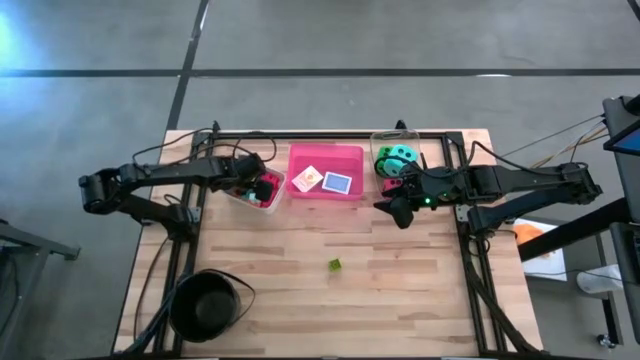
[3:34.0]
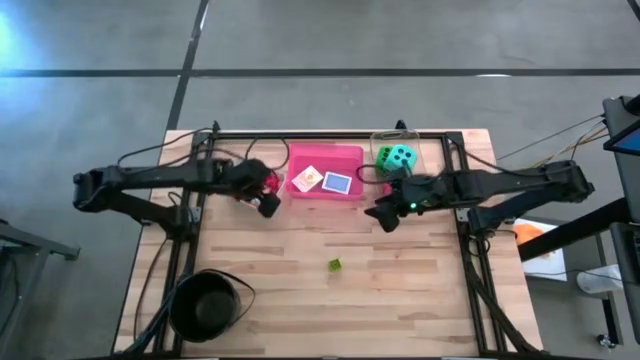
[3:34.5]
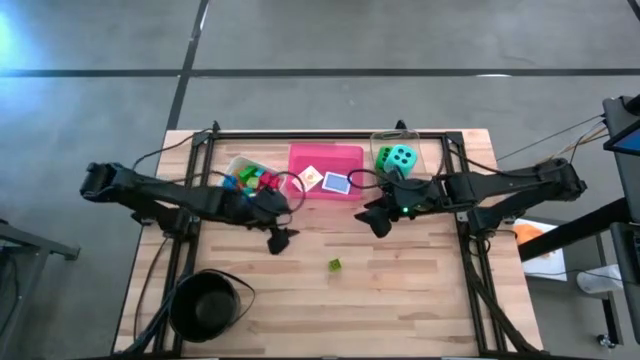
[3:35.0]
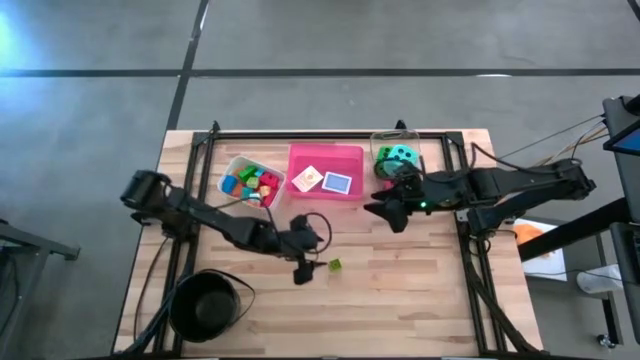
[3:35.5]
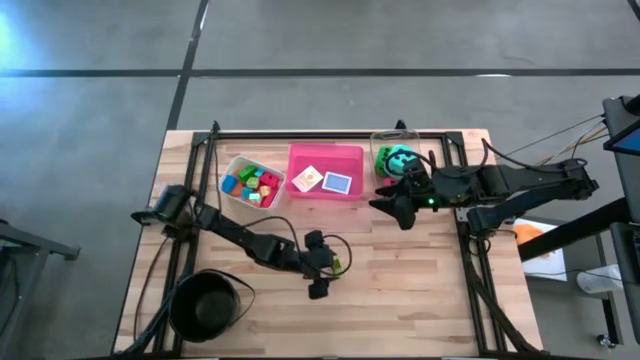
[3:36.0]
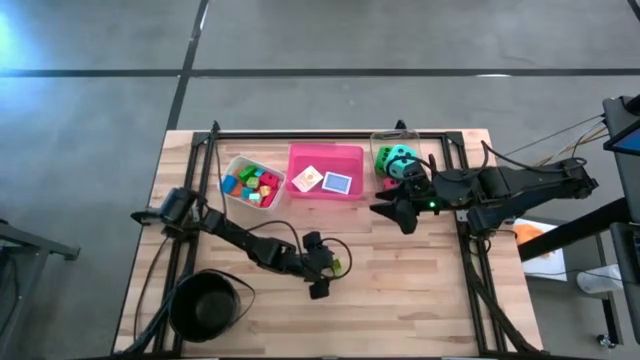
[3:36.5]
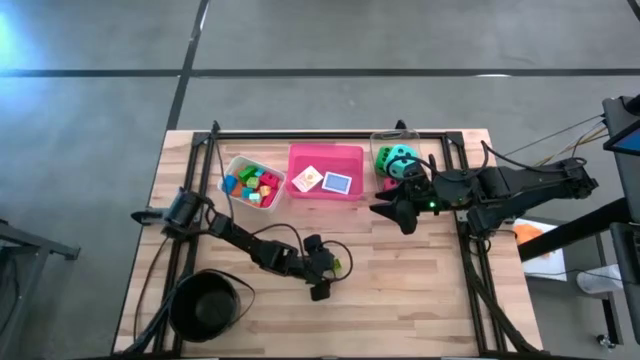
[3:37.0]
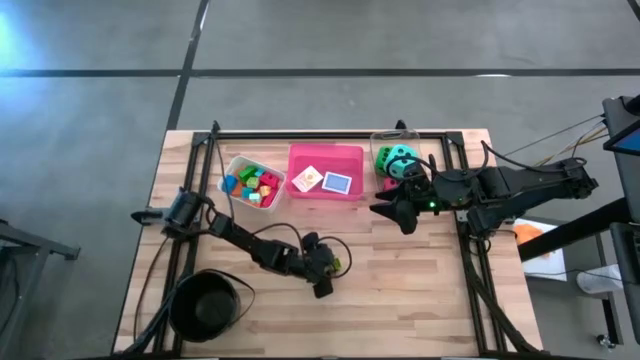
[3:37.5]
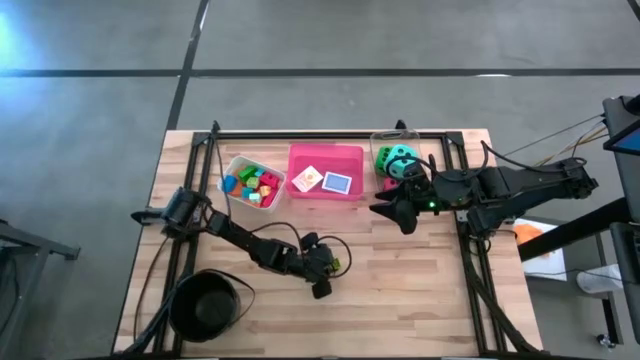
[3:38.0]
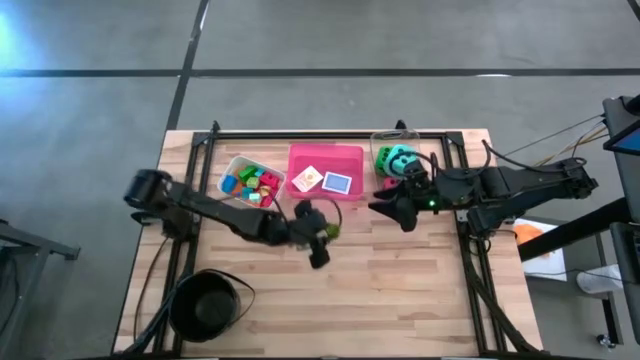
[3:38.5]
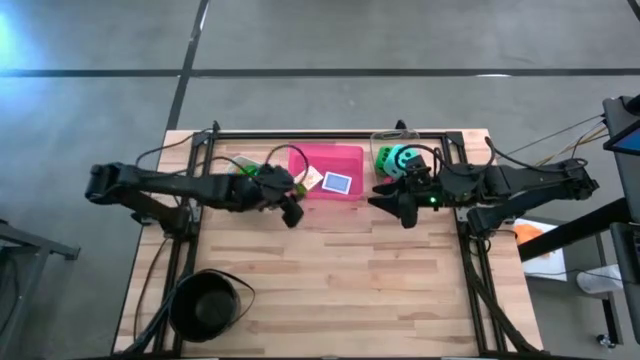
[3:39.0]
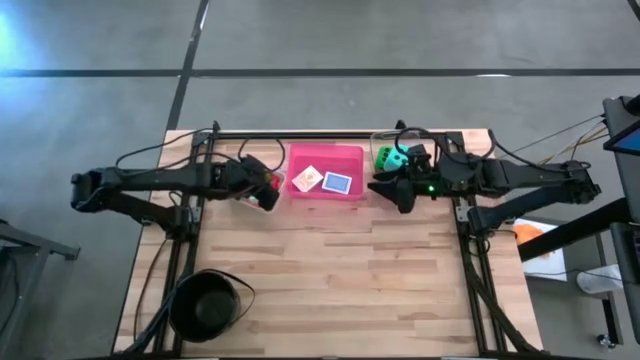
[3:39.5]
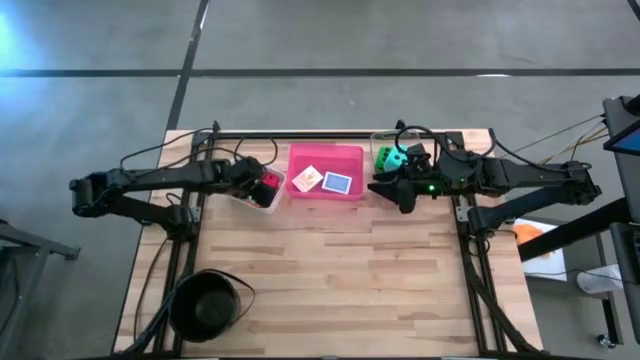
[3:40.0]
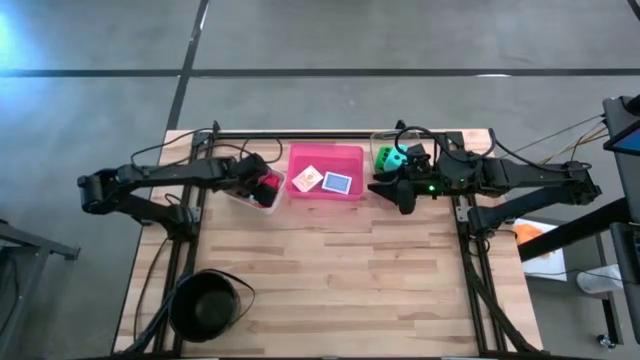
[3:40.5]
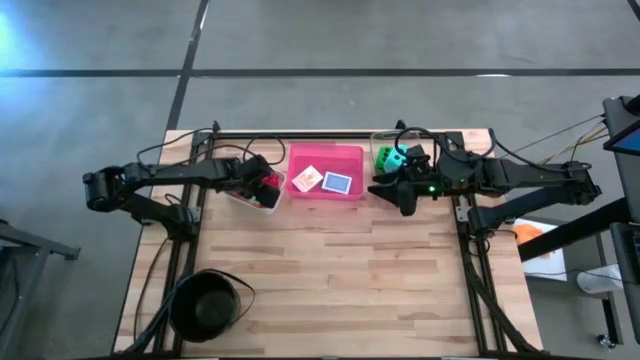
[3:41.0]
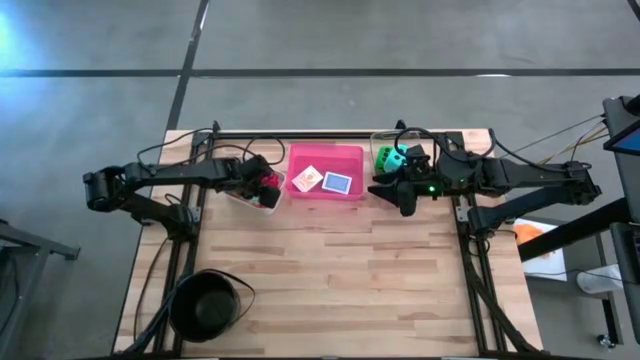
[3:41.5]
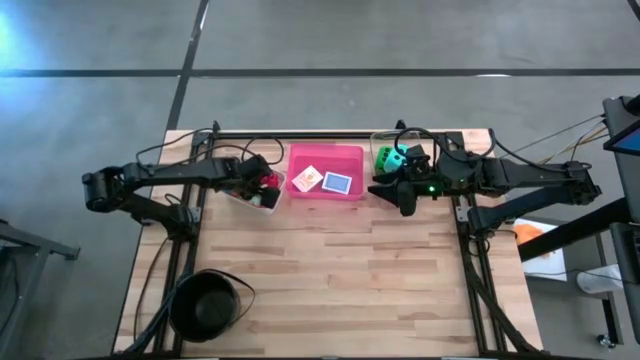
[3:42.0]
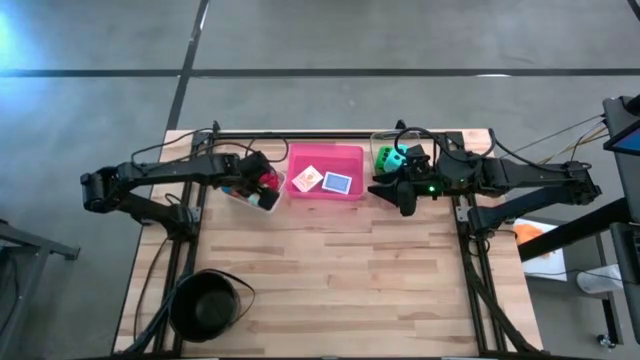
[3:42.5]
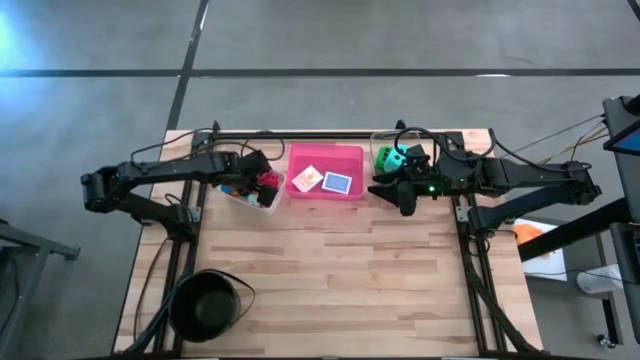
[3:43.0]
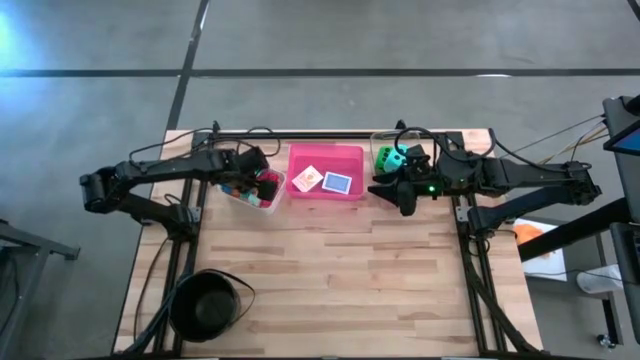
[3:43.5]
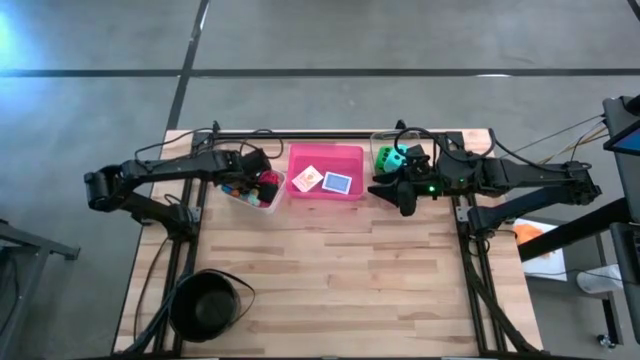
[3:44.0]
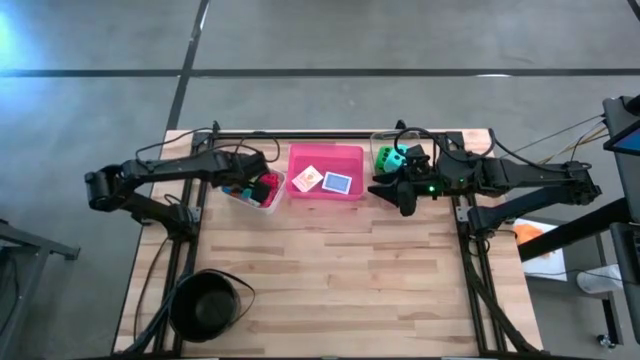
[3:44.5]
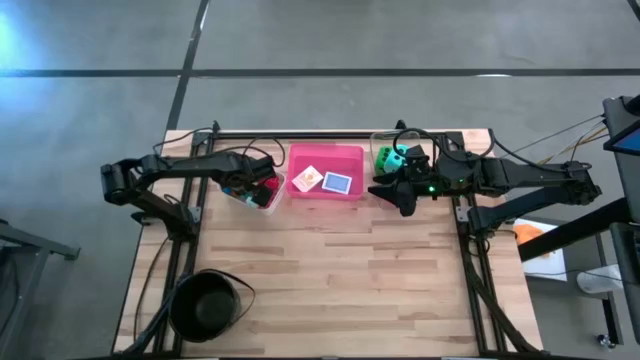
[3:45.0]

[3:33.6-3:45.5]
Task: Pick & Place Toys
Put the green game piece into the white bin

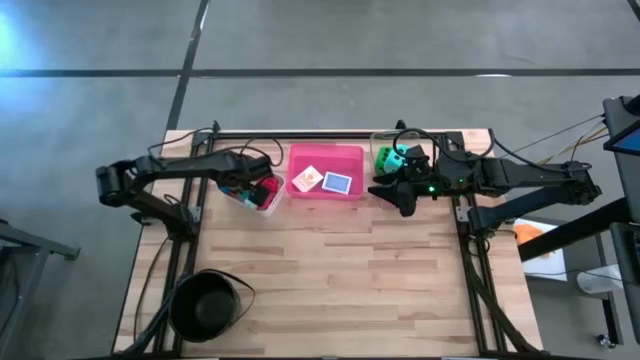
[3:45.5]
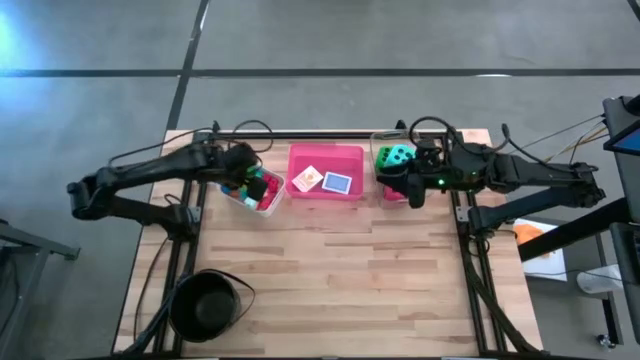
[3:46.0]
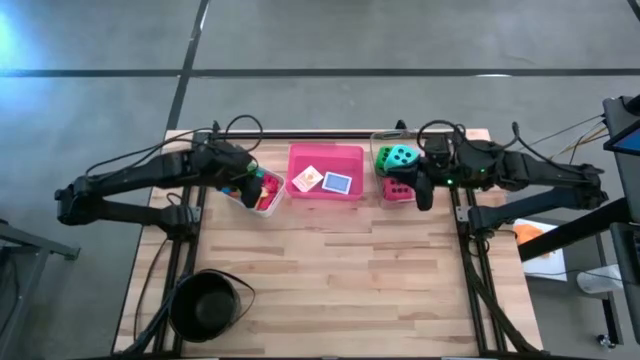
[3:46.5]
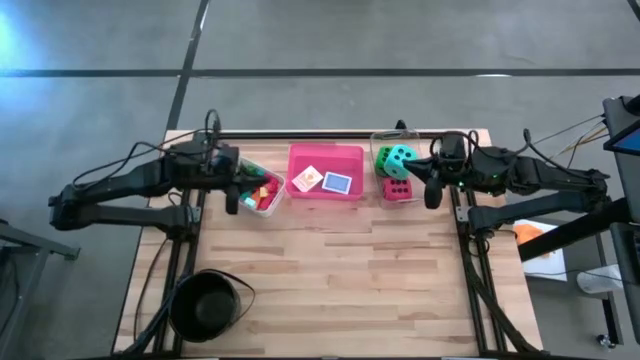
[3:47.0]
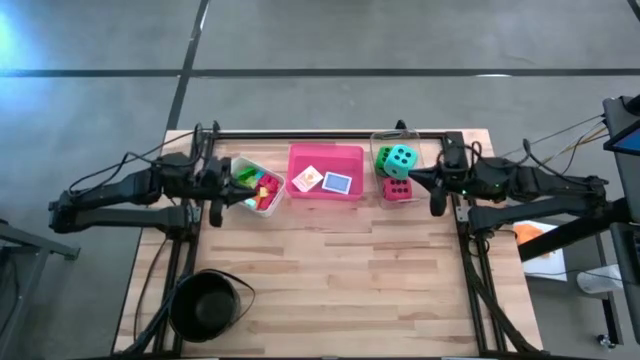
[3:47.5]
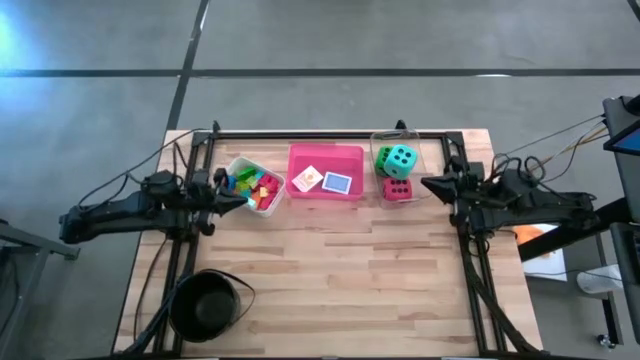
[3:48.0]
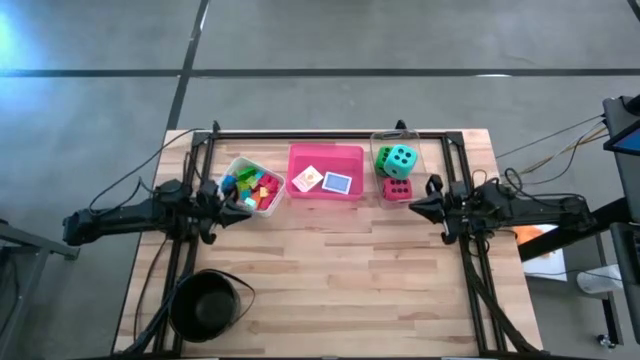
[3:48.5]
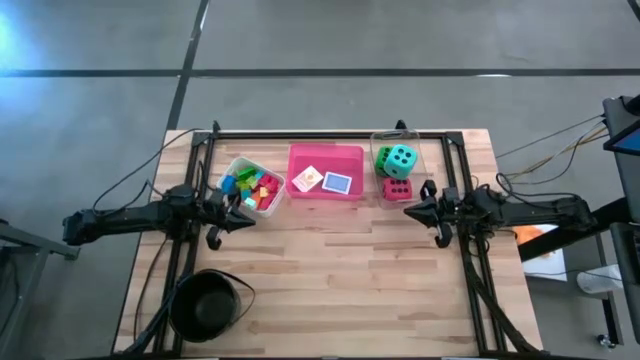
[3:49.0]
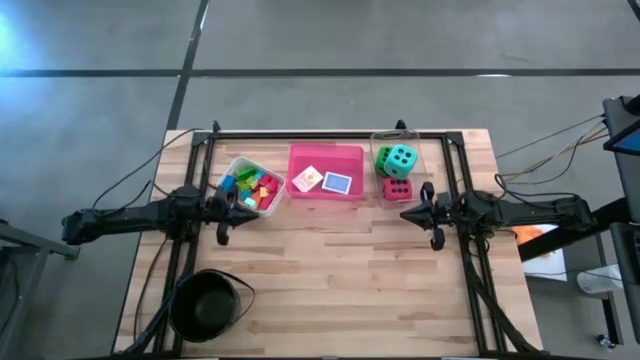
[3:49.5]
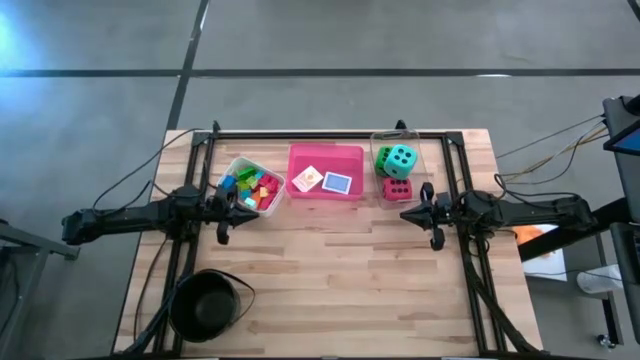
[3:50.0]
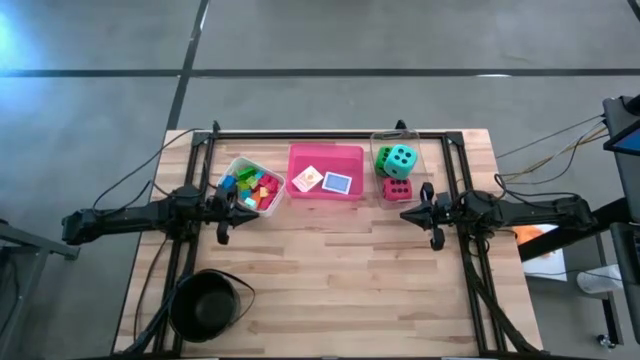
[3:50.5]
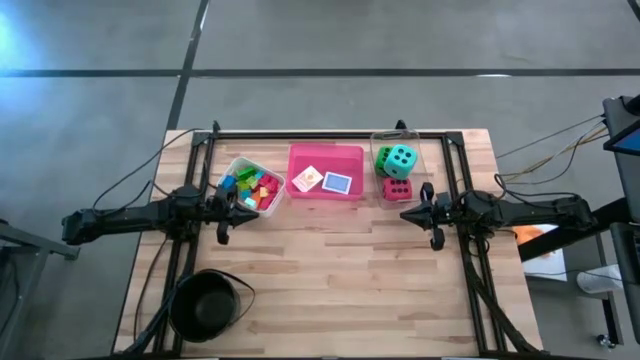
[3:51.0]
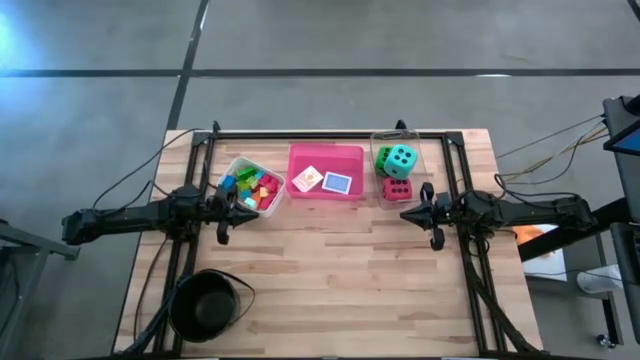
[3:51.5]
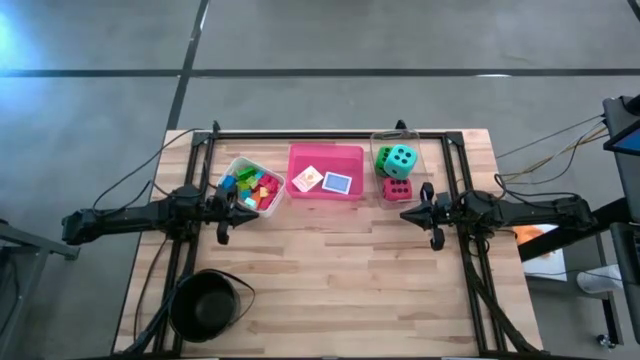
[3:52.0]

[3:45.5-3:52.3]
Return to Home Position

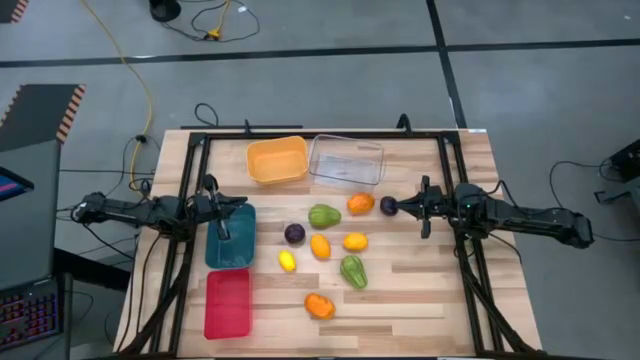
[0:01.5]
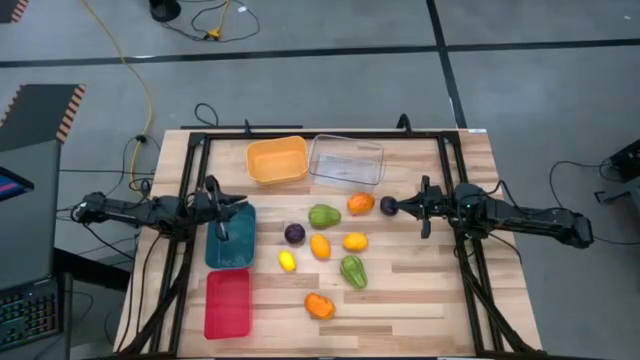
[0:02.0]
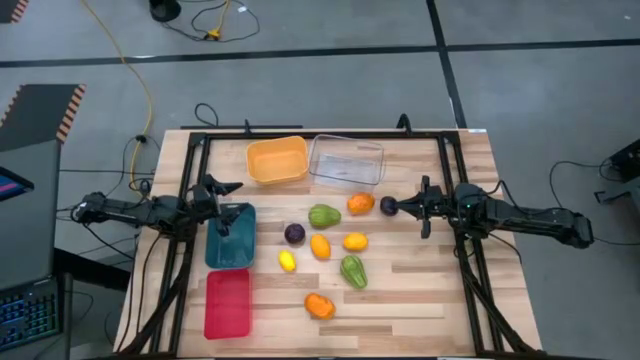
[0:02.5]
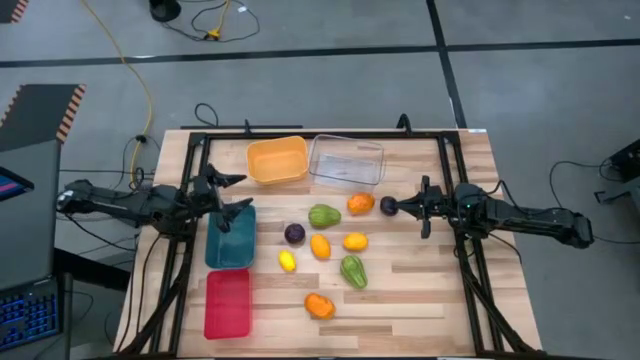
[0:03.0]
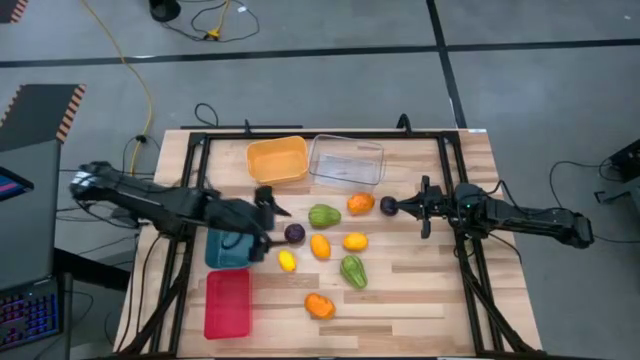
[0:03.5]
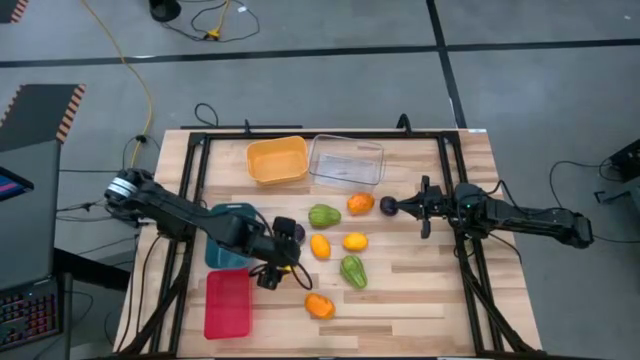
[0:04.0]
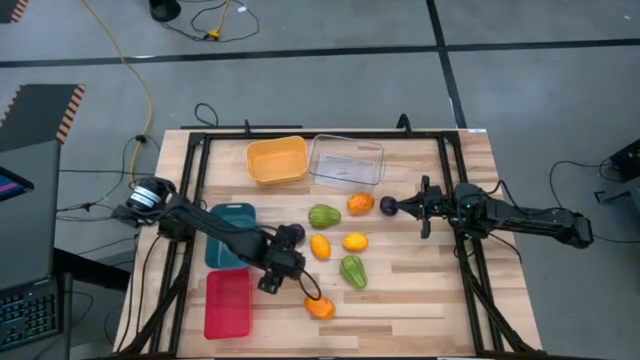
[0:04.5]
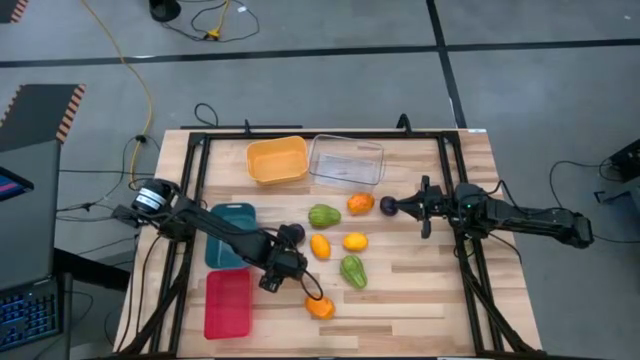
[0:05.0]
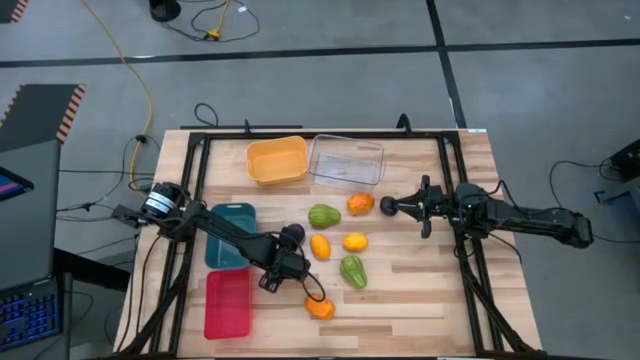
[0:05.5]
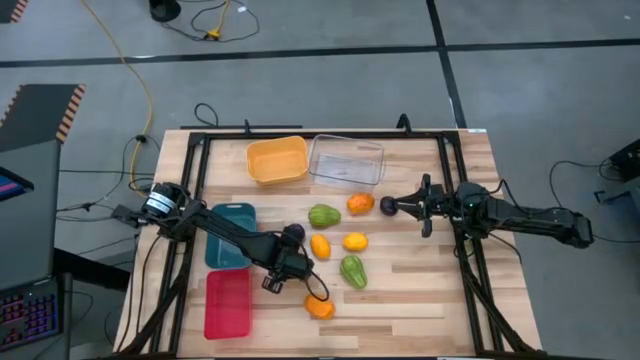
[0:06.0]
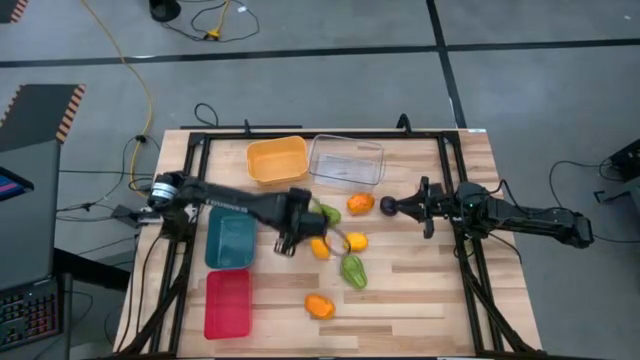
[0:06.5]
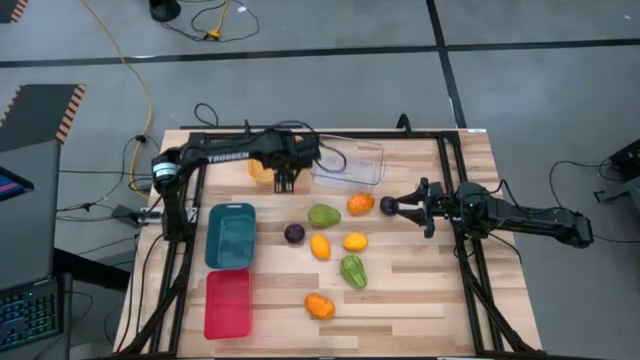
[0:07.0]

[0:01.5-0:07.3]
Task: Sort produce into baskets
Put the left yellow lemon into the yellow bin
